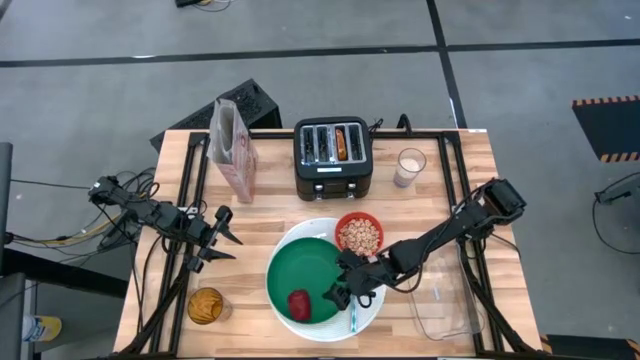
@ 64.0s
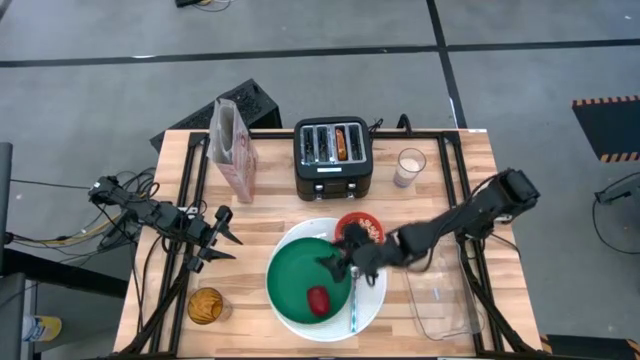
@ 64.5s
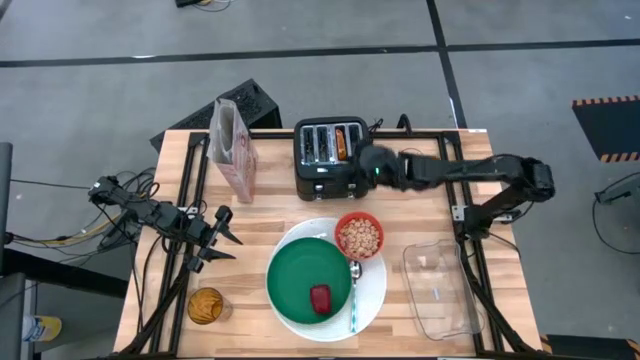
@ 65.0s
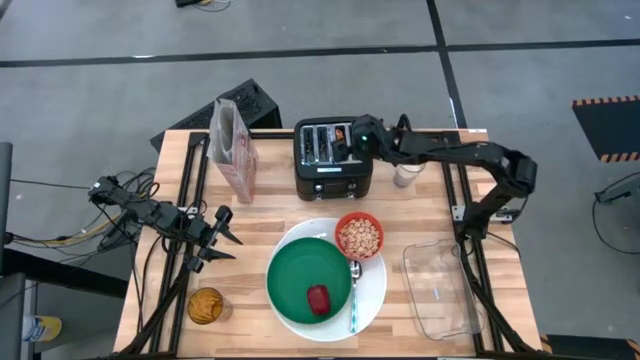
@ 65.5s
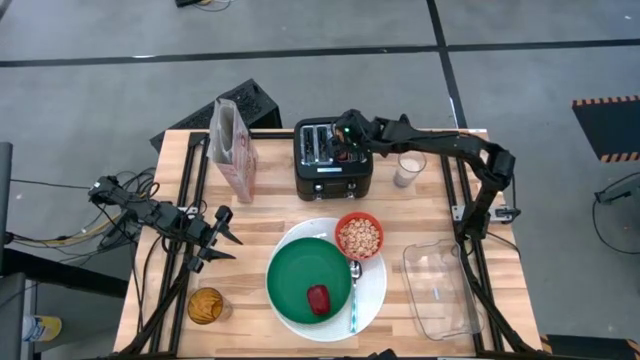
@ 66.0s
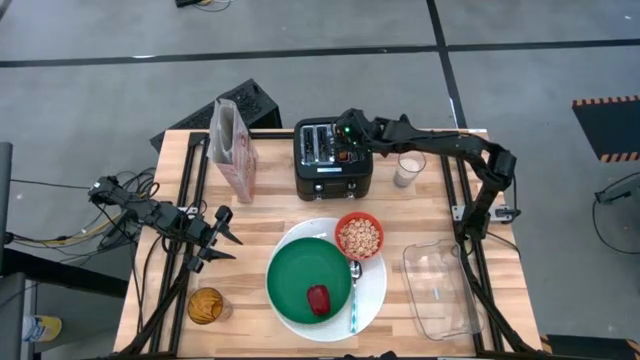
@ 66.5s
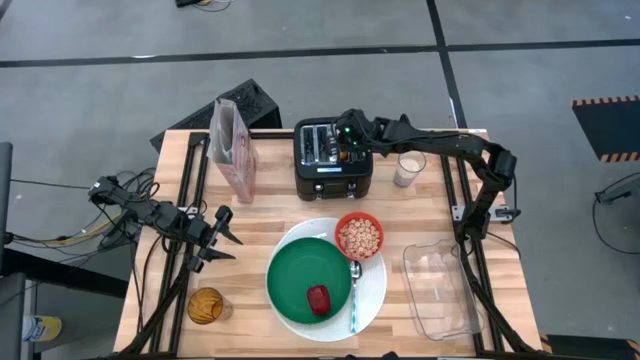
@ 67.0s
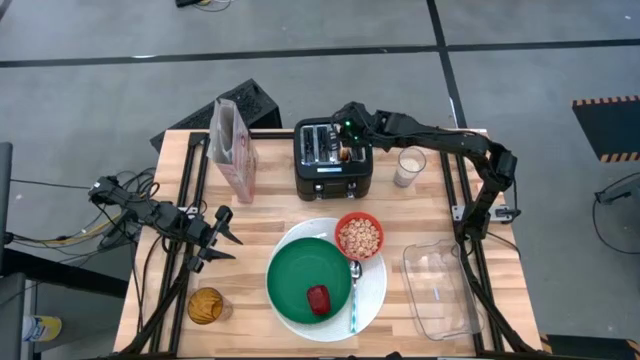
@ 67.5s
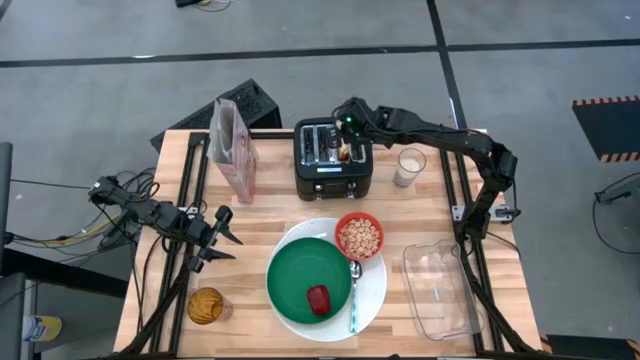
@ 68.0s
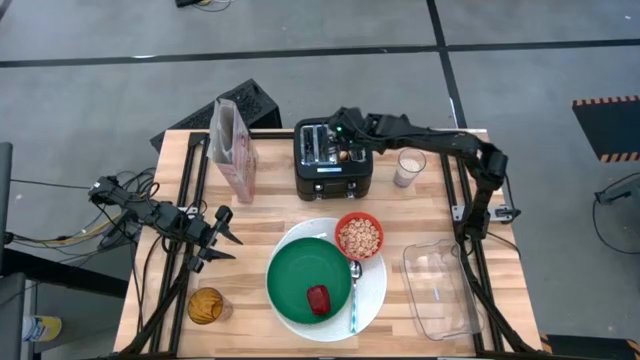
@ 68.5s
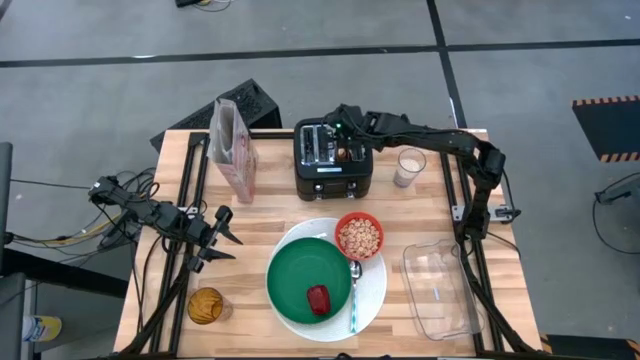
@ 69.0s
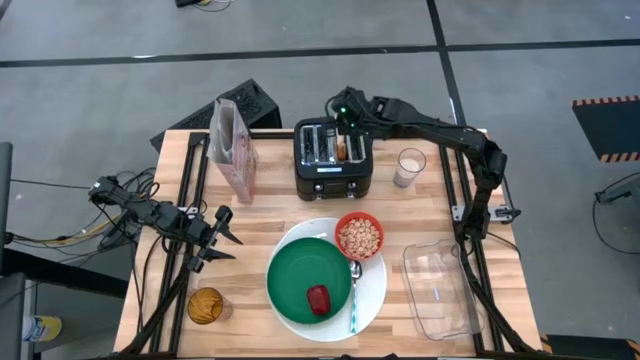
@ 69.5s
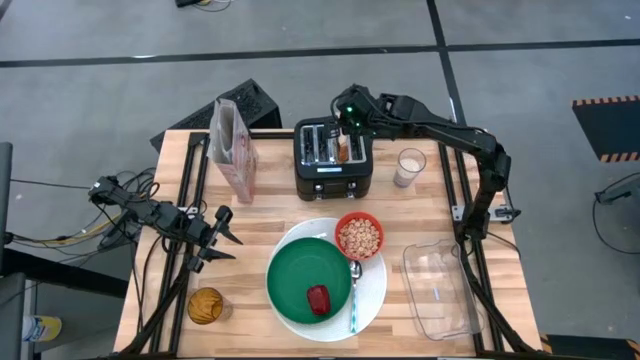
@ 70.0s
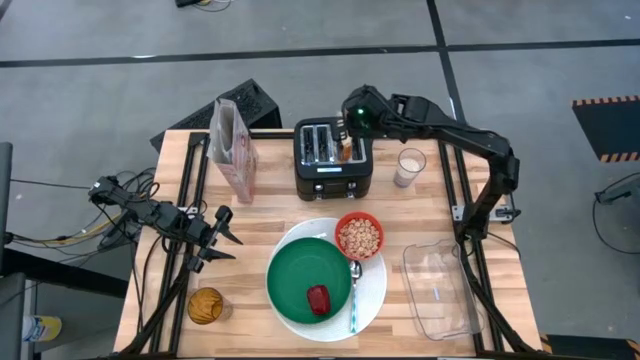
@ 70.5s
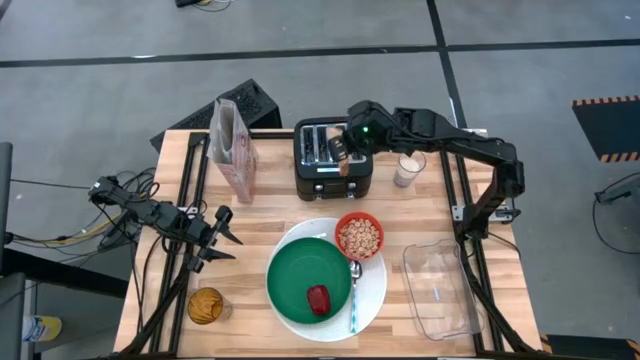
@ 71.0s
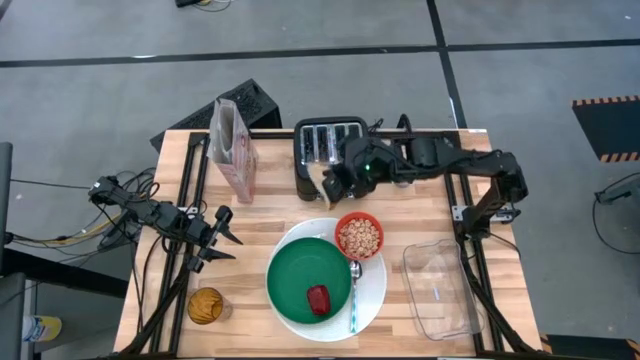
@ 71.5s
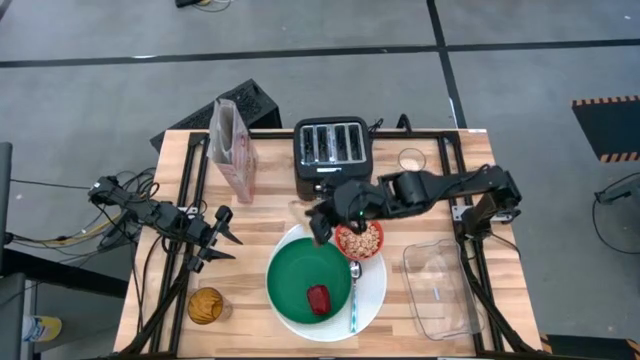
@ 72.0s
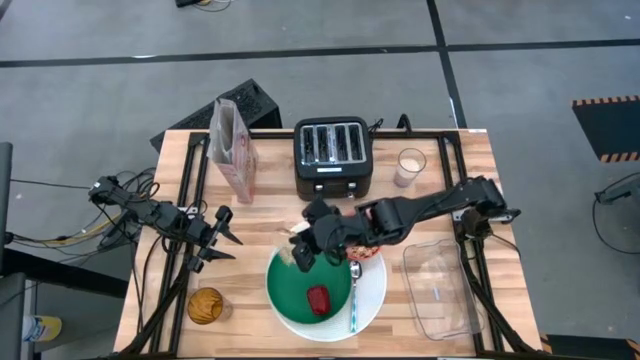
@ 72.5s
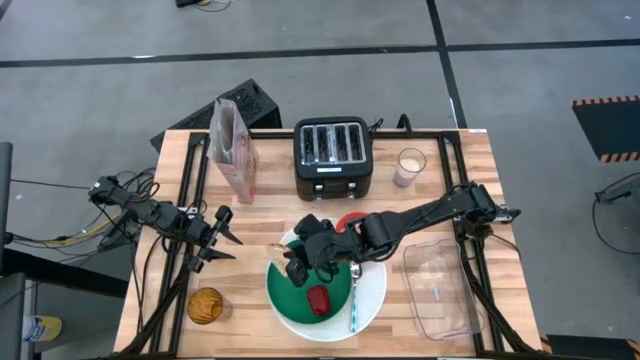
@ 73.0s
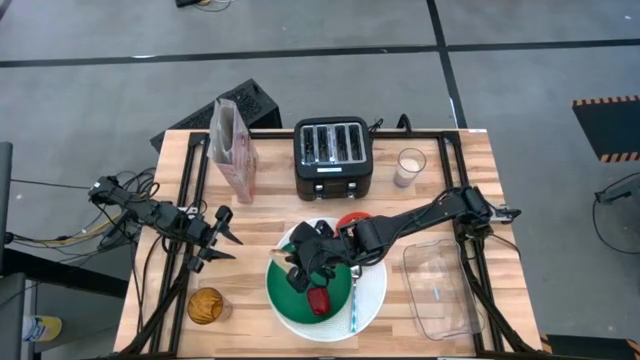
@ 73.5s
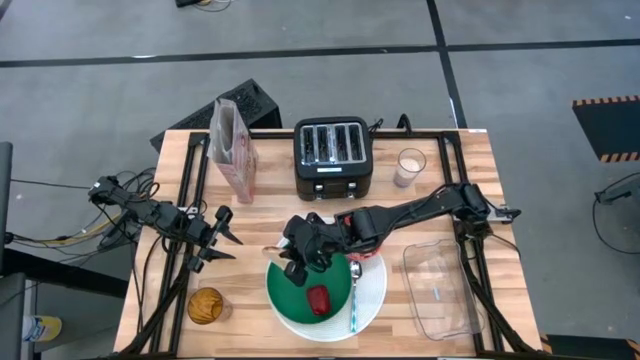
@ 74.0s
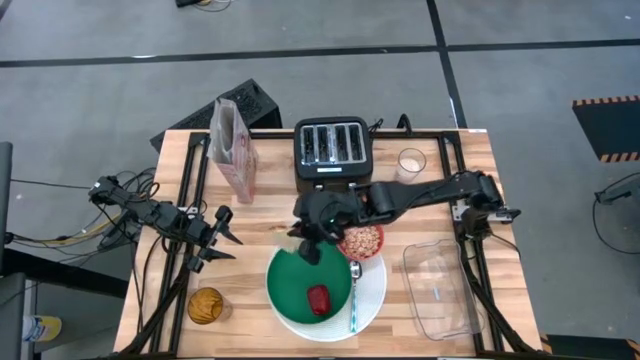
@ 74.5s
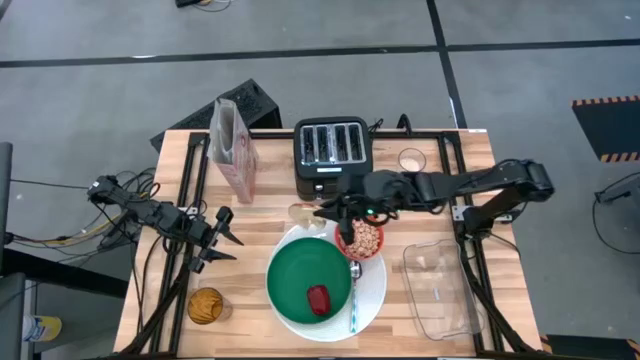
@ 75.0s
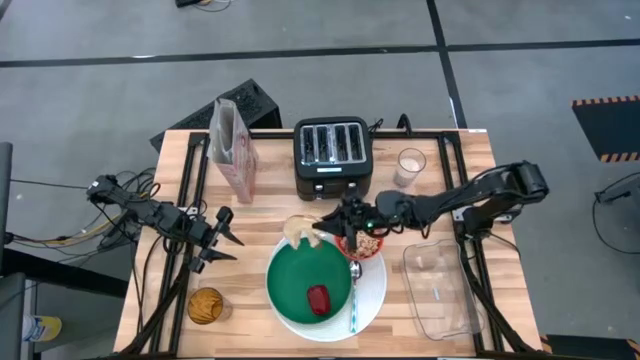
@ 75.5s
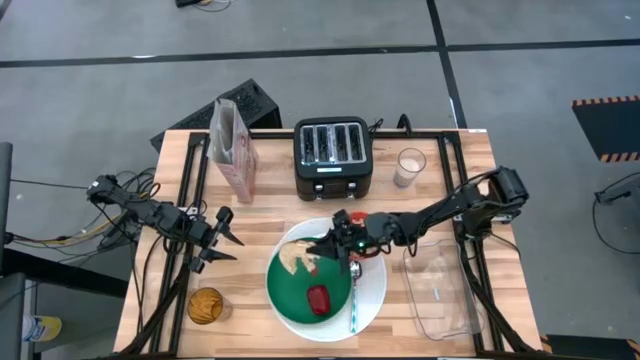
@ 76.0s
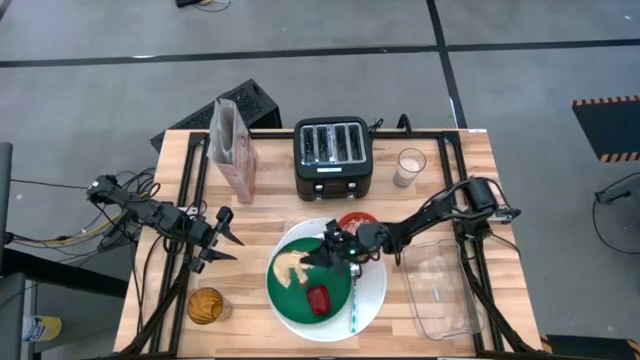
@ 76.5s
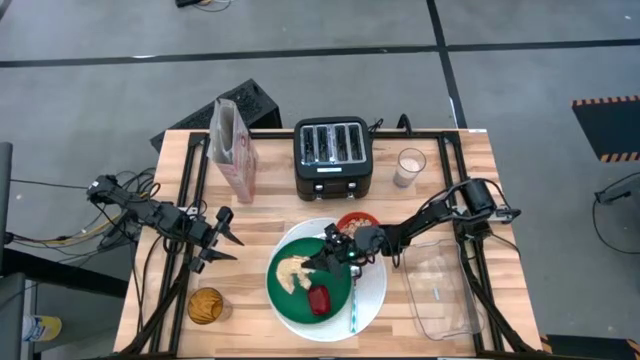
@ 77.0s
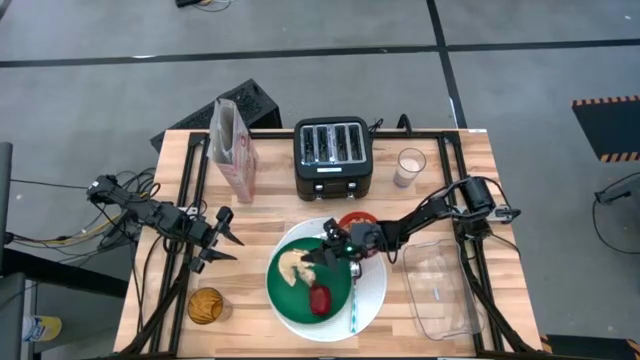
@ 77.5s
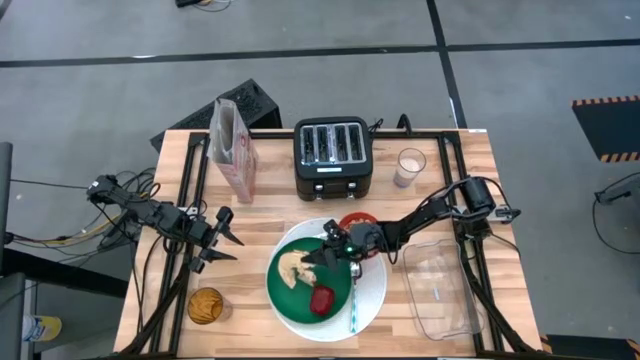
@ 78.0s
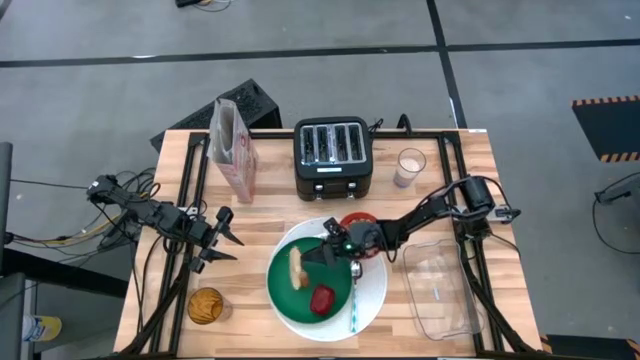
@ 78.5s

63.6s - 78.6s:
Task: Arrange a breakfast setting
Put the bread on the plate

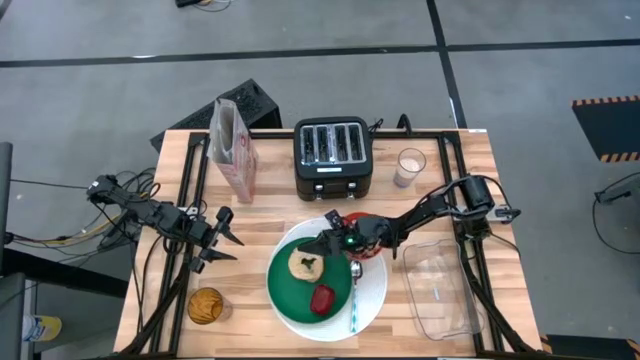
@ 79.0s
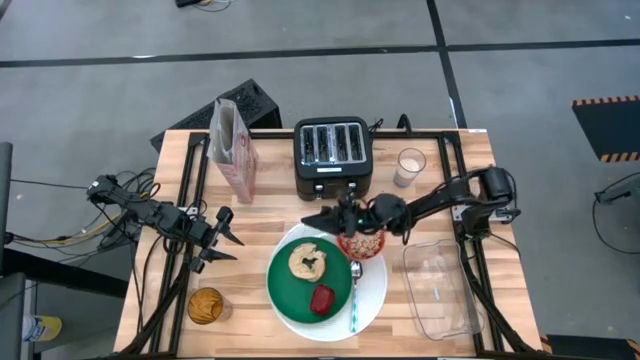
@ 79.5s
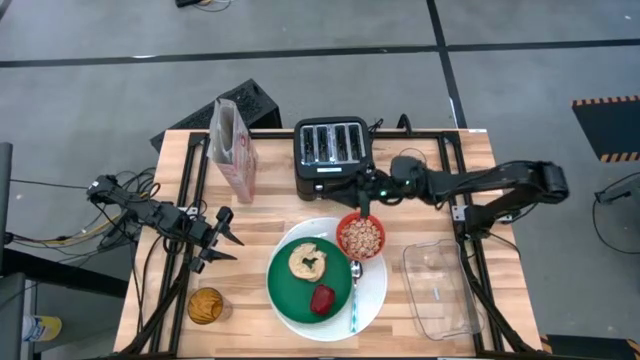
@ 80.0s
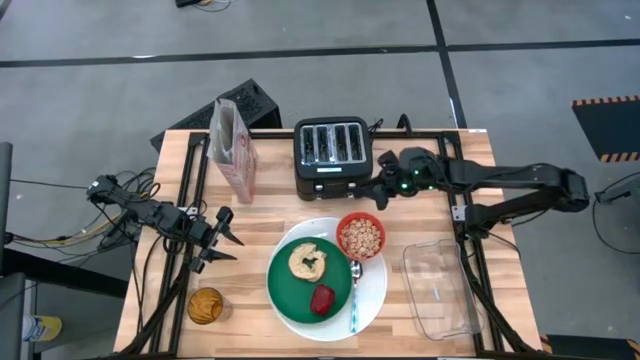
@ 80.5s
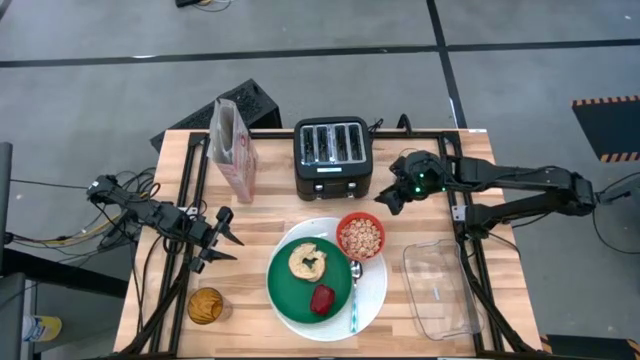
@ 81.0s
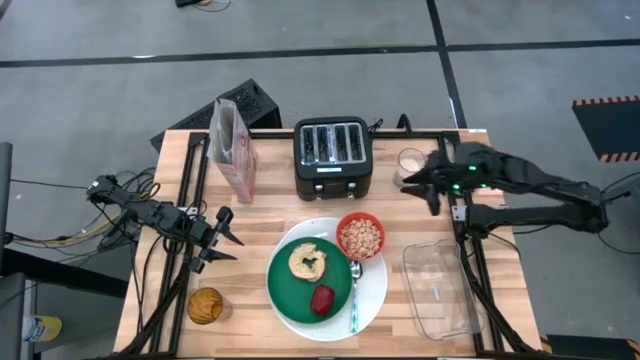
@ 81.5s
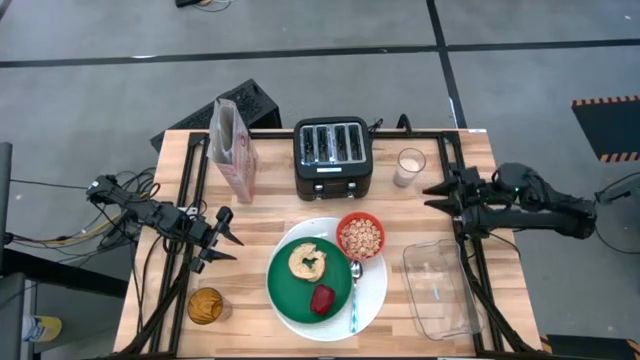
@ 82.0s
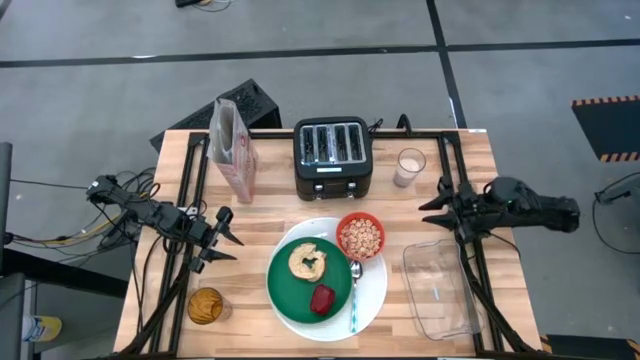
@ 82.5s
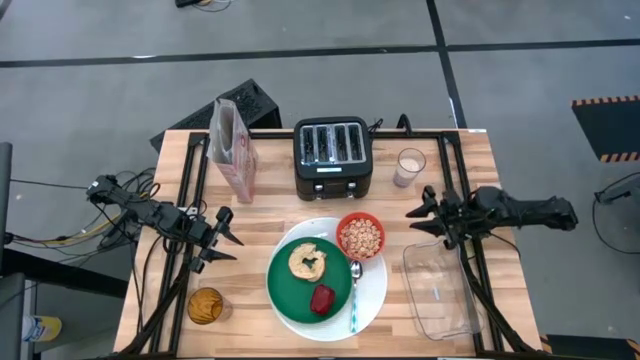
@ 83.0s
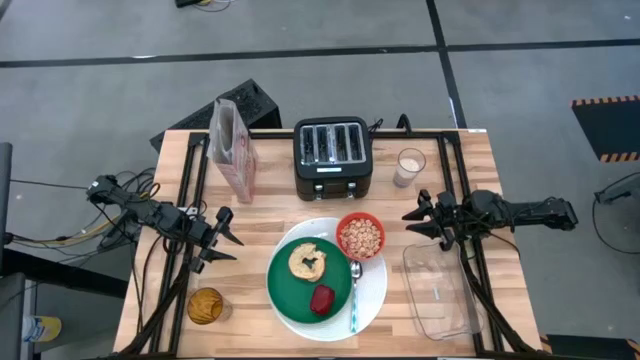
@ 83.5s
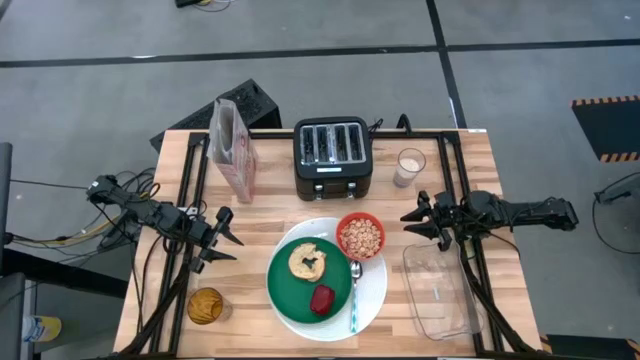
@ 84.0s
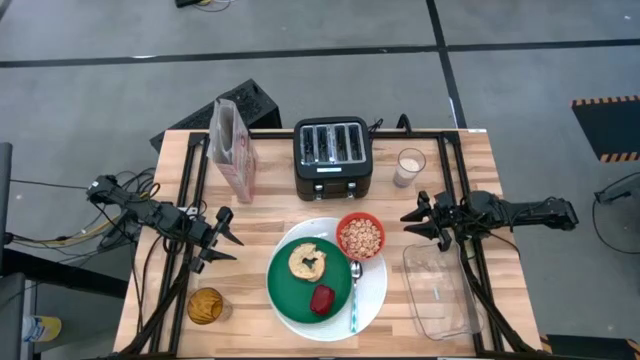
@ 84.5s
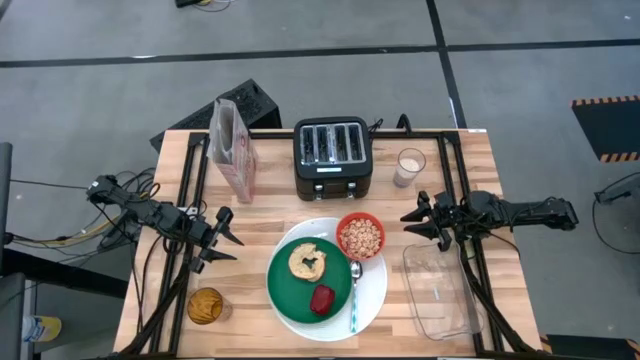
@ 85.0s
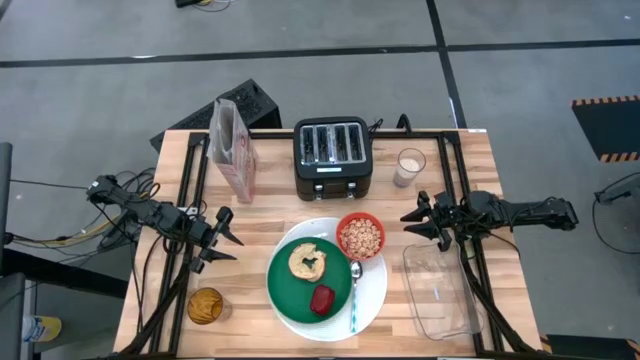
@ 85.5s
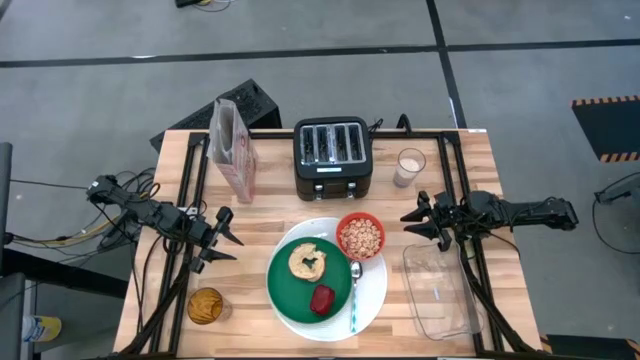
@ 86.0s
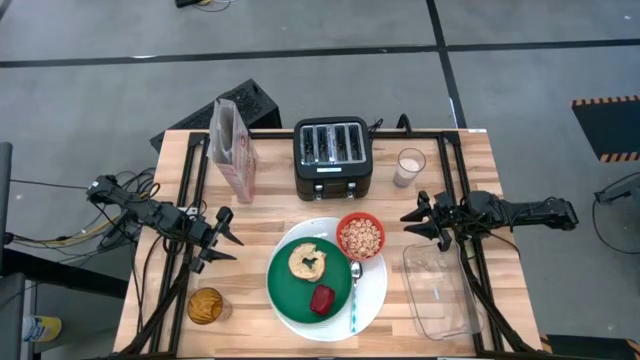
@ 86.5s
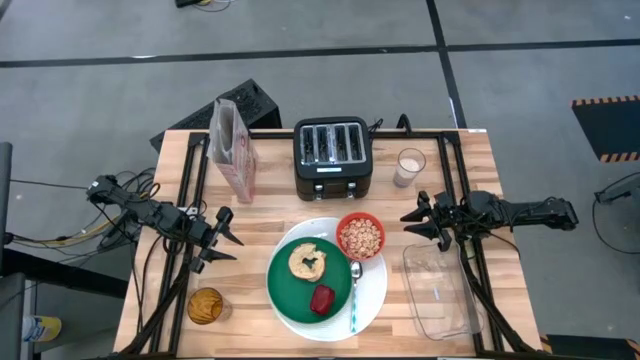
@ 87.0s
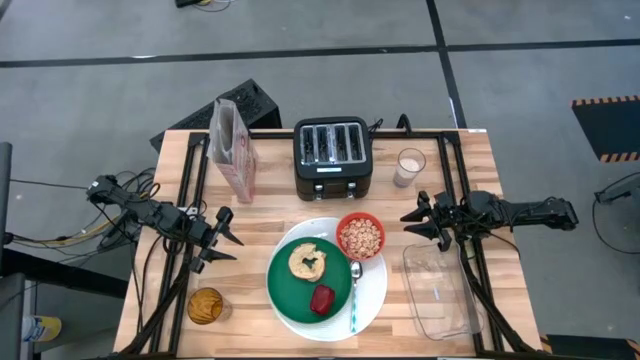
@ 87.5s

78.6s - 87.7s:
Return to Home Position
